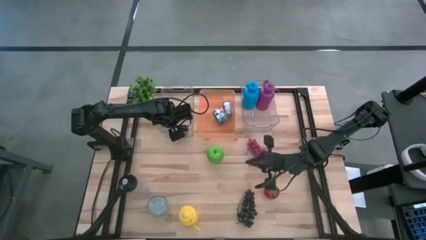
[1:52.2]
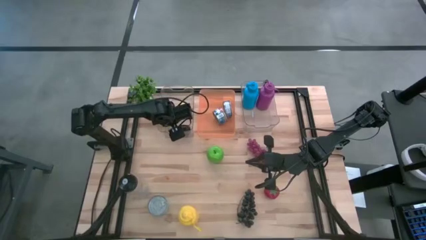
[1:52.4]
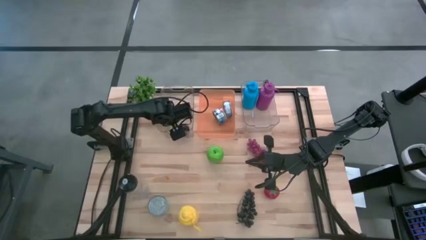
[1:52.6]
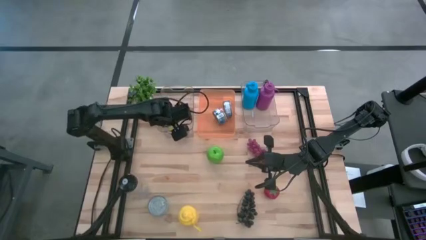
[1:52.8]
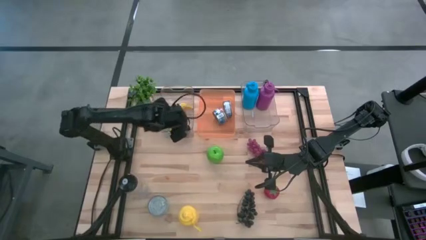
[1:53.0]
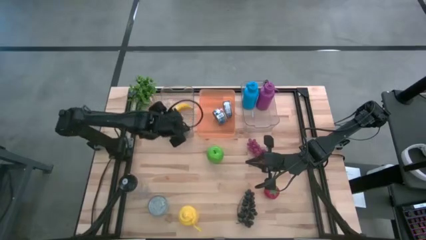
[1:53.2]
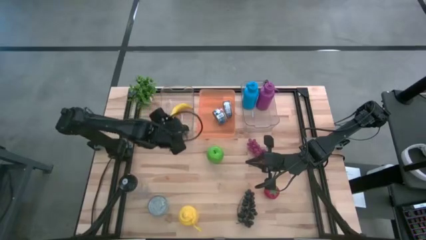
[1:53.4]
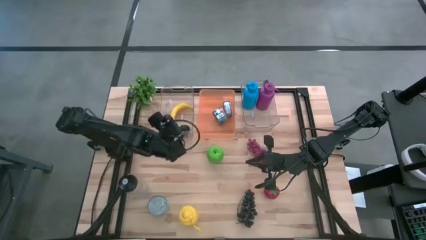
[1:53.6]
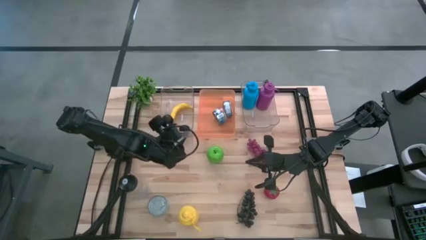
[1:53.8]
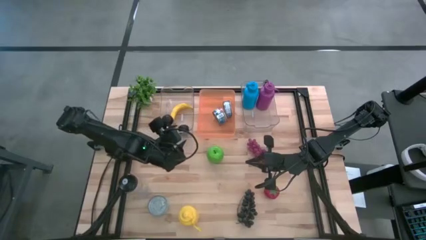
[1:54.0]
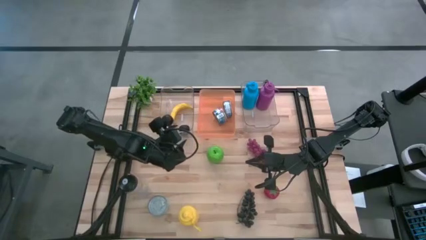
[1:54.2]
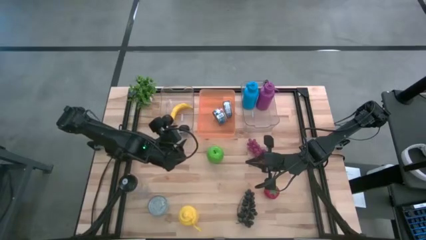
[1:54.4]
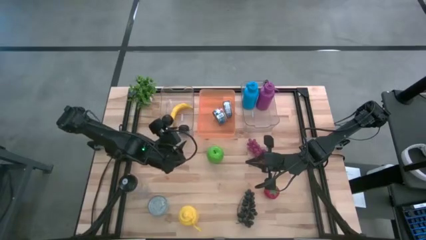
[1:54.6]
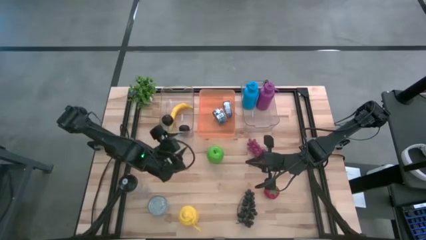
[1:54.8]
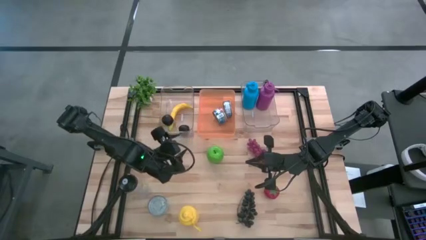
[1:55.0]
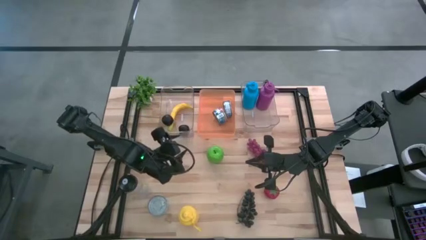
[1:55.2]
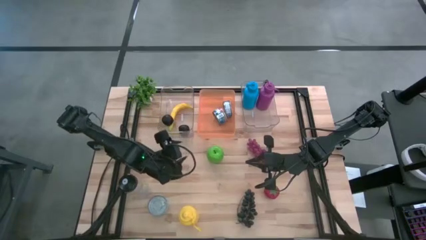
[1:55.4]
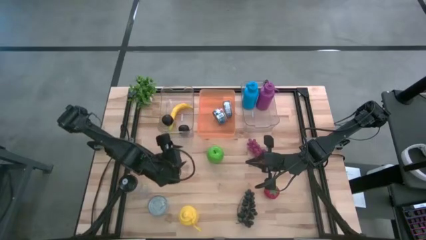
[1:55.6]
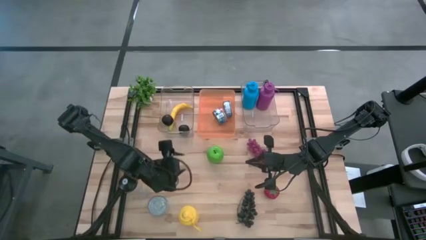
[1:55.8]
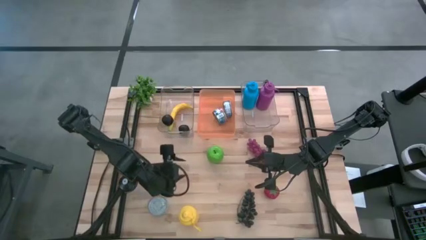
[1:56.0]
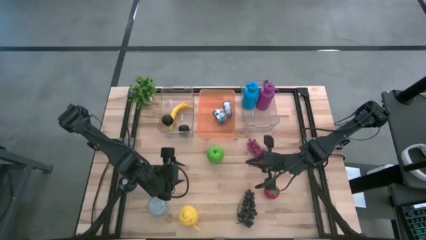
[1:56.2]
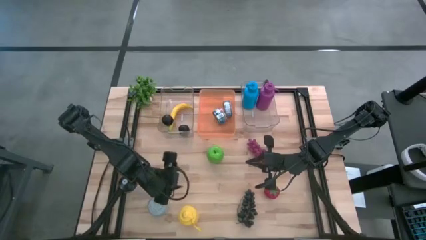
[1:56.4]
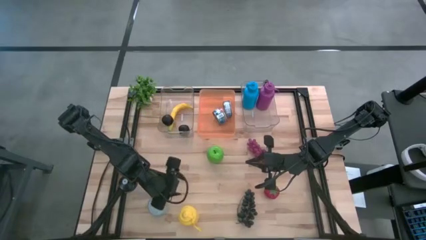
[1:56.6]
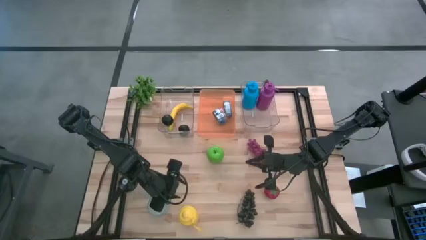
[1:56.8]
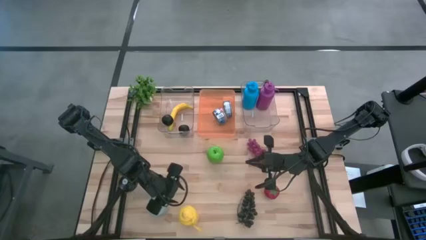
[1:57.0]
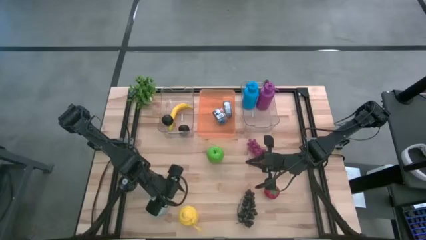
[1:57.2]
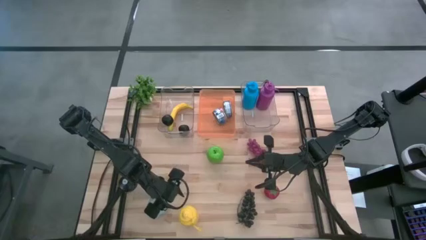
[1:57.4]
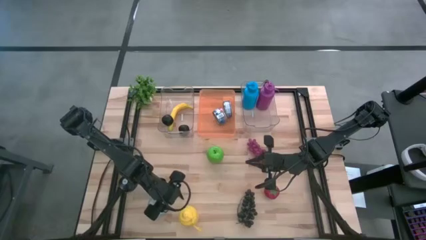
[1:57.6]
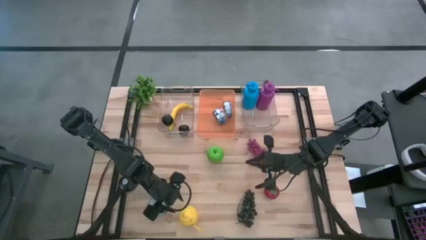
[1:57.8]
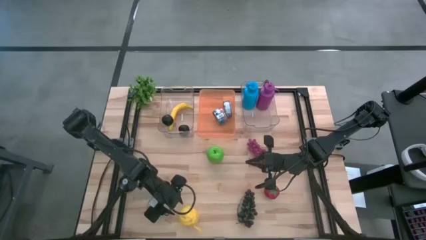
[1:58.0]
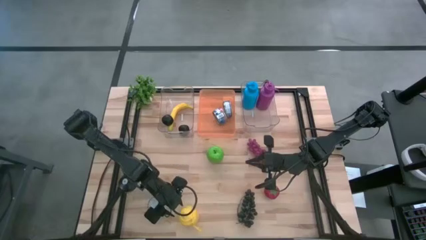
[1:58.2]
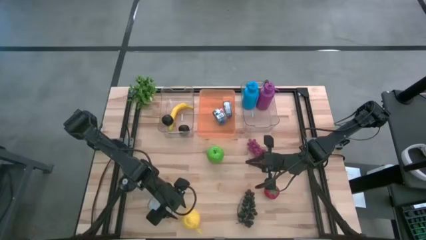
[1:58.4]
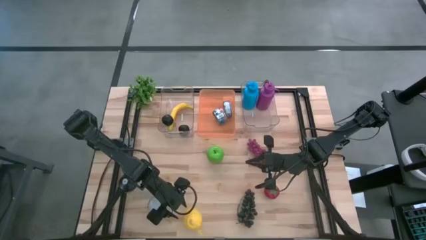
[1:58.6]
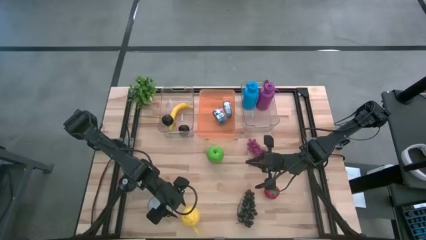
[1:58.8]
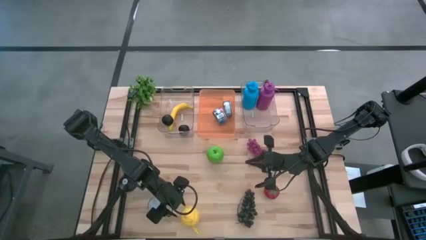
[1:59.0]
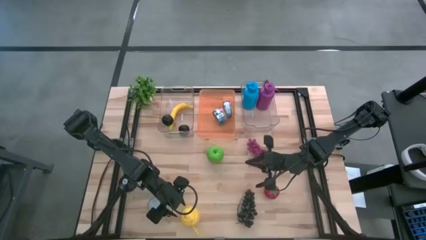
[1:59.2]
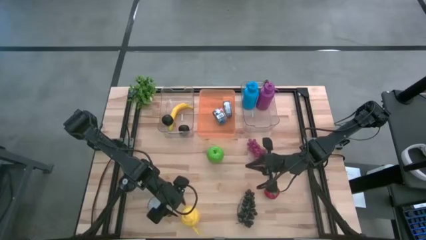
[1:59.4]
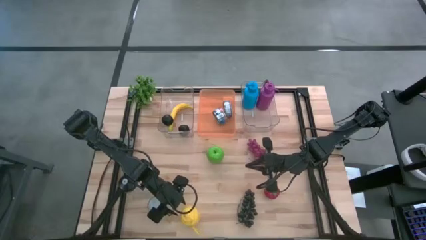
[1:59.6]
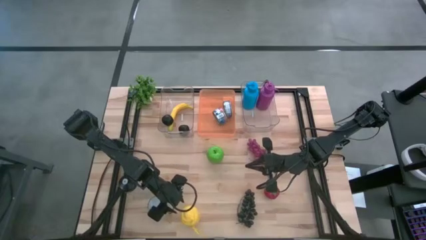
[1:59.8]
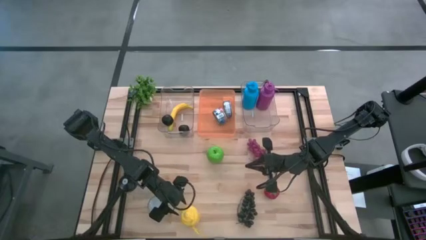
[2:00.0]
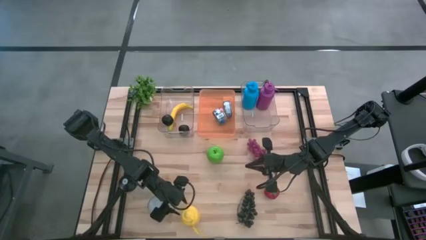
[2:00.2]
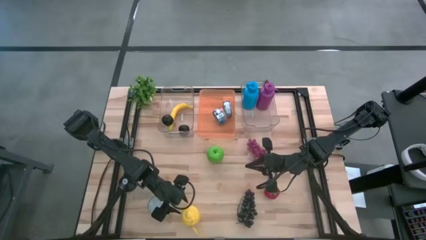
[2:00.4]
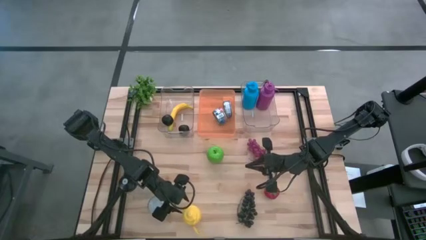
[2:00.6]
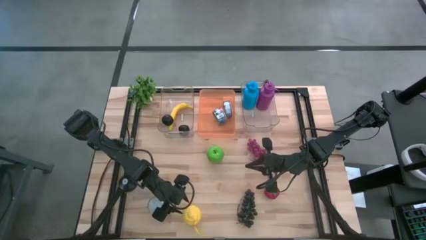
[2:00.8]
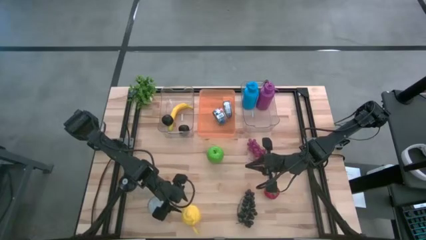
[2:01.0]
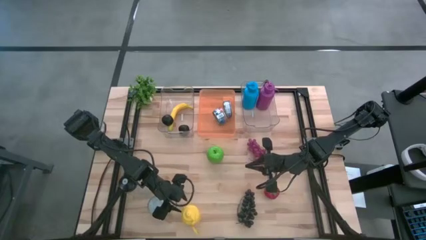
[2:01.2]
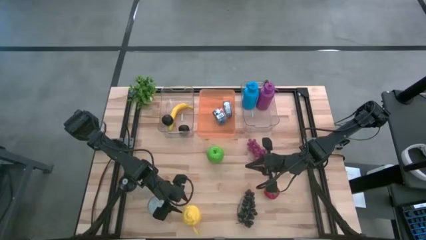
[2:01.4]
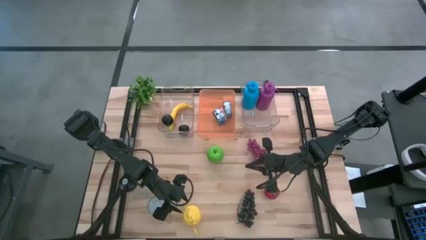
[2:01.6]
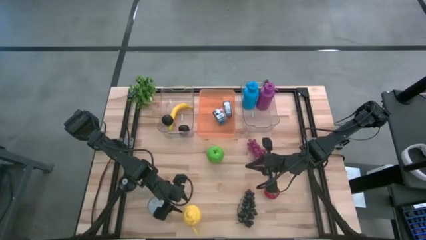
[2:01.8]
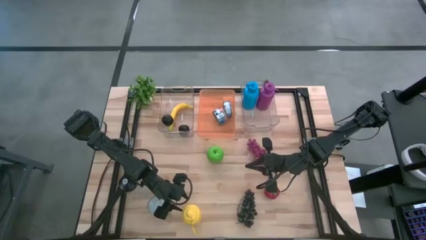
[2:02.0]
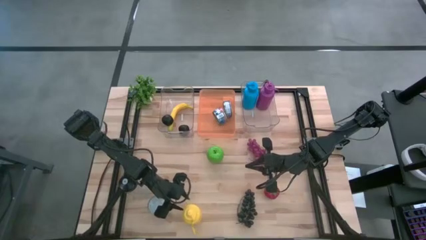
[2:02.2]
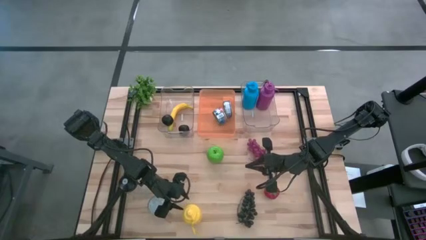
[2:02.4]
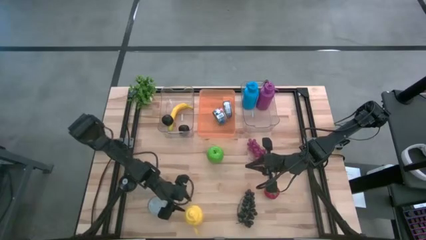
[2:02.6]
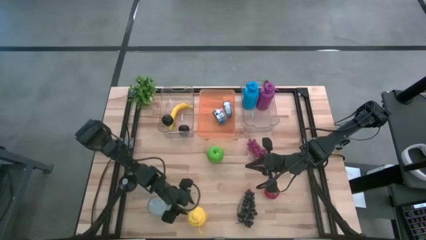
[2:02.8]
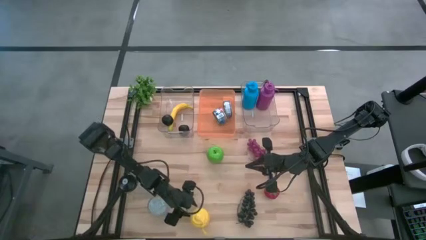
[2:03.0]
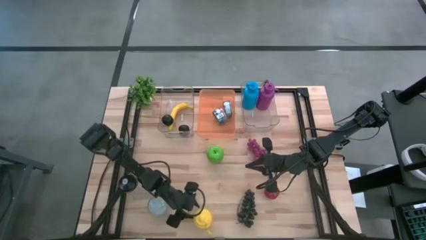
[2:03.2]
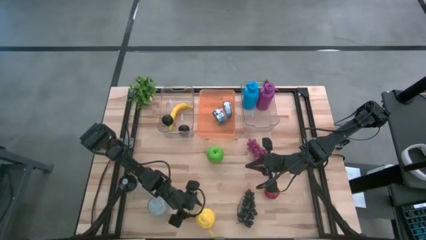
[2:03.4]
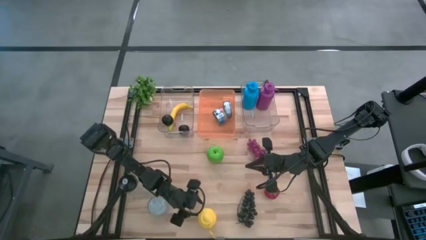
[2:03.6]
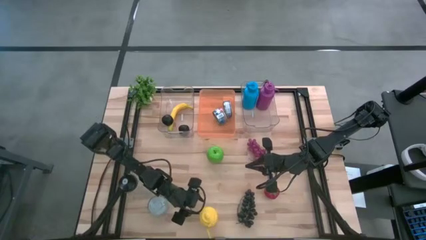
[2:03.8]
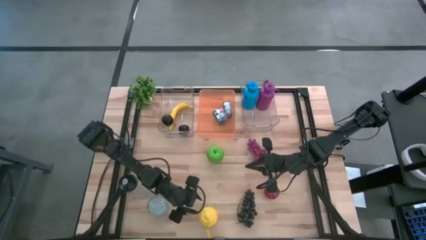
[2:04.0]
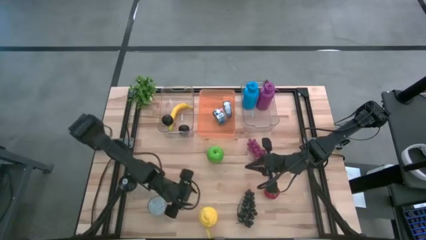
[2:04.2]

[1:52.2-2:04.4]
Task: Pick & Place Food Item
Put the yellow water bottle into the right transparent bin

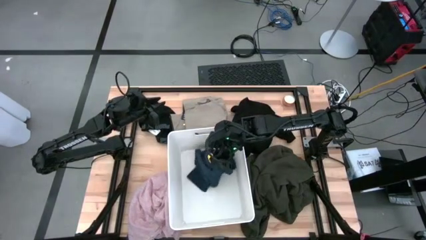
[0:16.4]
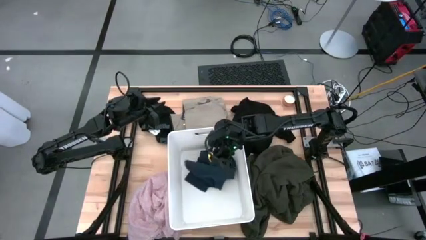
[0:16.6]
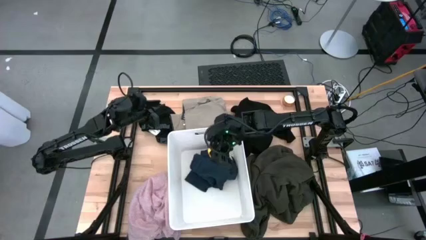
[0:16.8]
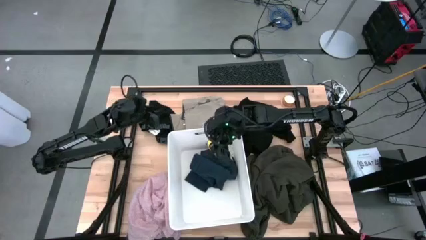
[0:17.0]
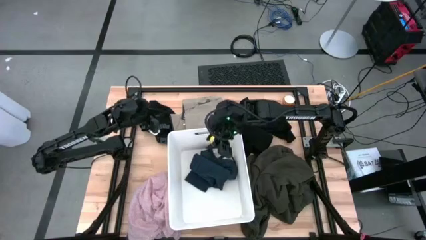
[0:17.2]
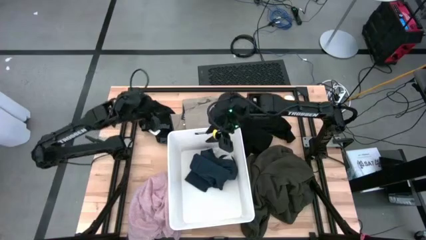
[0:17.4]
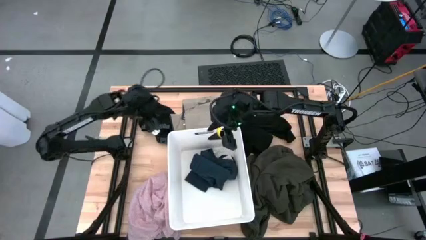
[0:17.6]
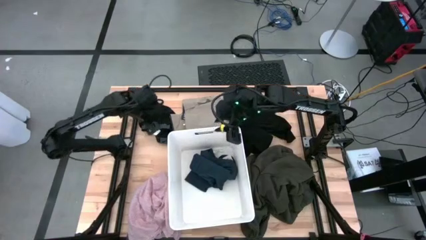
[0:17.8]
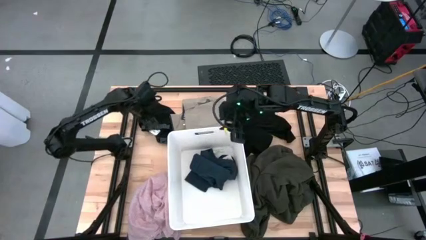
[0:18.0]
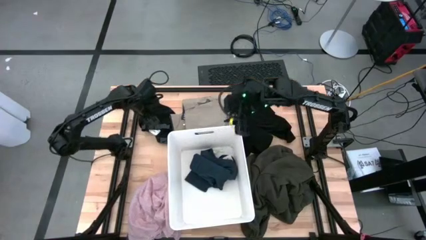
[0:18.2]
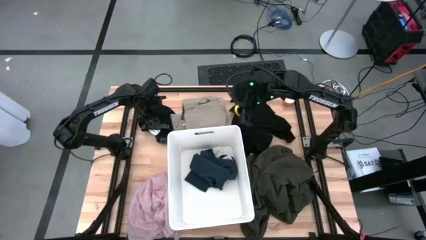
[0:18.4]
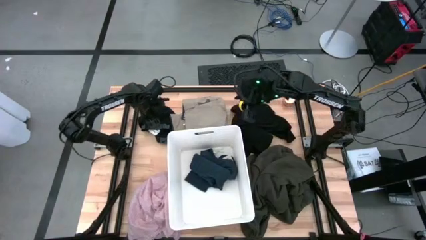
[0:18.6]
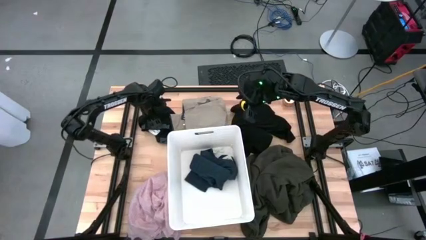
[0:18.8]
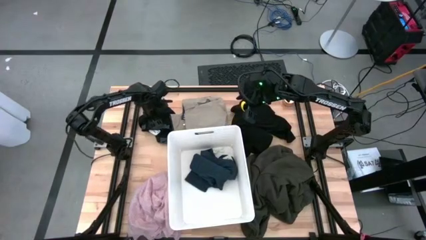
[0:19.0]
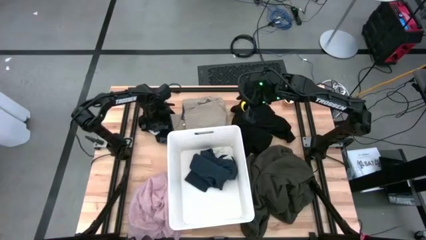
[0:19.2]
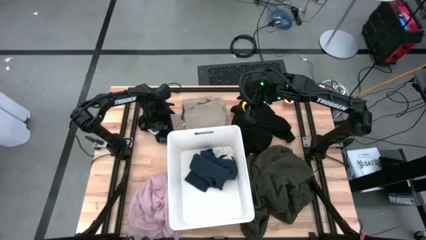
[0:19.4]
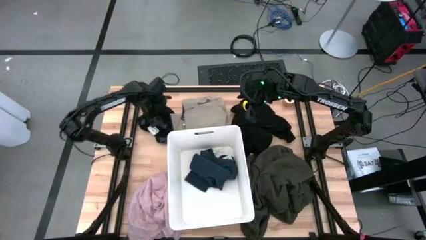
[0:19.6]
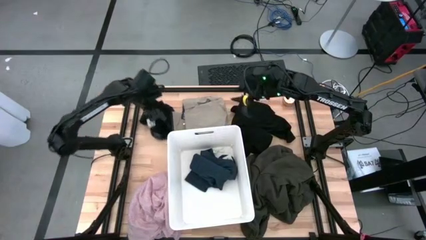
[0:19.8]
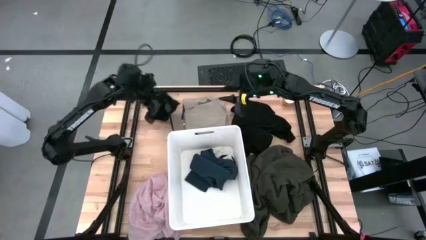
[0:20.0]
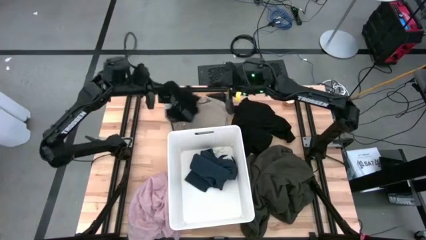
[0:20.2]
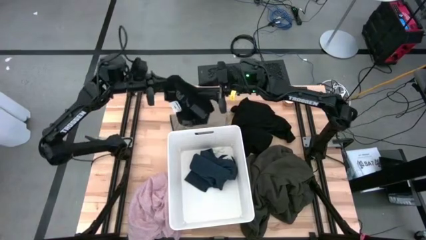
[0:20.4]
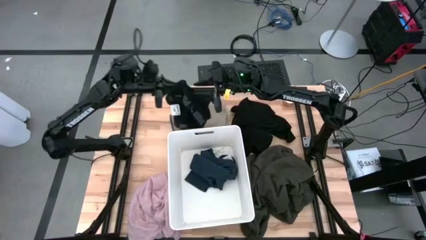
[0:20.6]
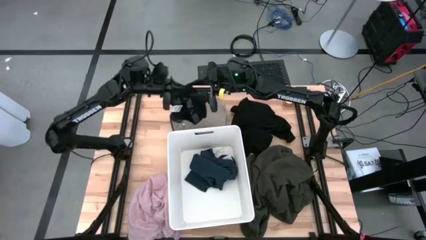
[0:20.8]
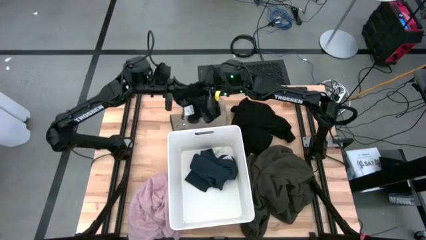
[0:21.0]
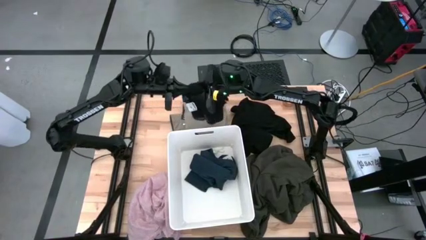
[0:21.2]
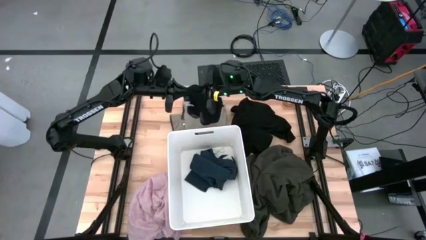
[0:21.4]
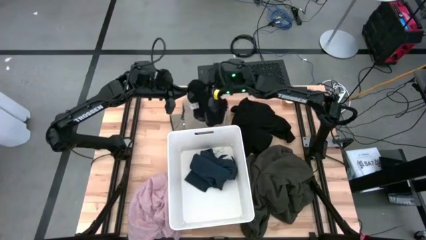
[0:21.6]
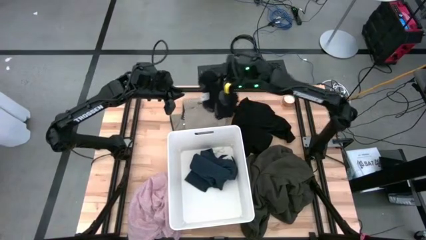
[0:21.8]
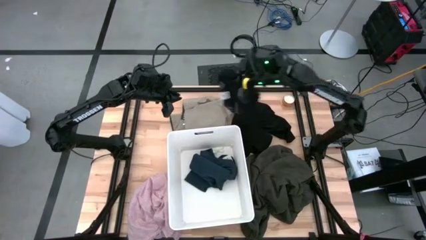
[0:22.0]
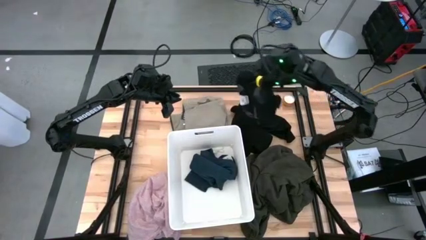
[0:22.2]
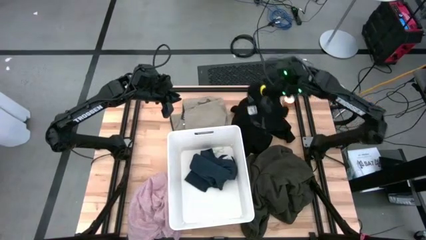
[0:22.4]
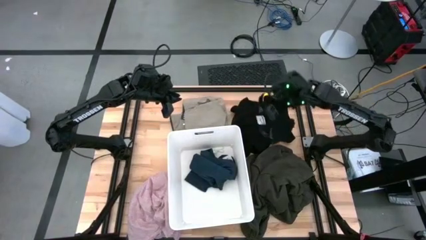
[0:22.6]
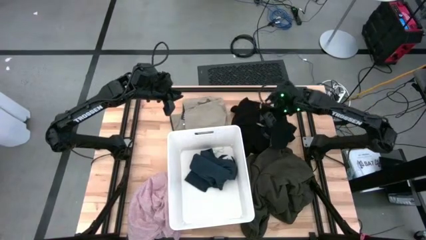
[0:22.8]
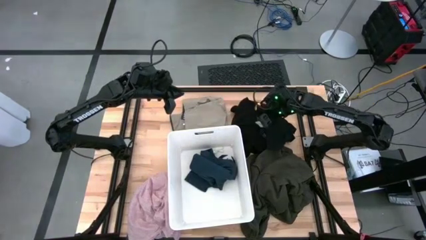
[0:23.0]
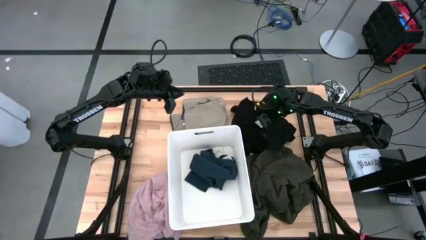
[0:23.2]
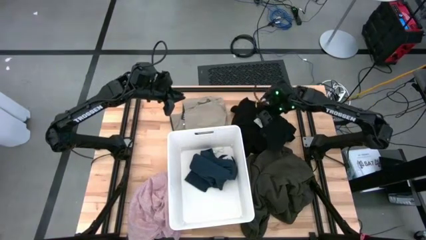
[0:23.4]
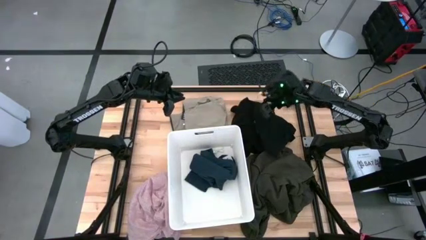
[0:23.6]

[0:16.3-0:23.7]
Task: Sort clothes
Put the black boxer on top of the black shirt
